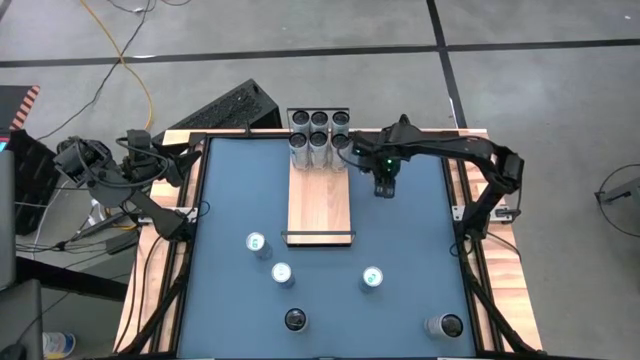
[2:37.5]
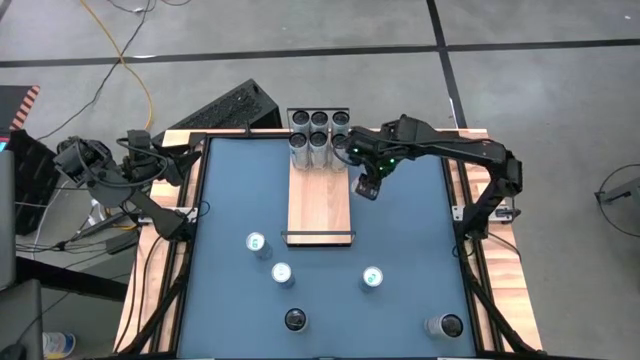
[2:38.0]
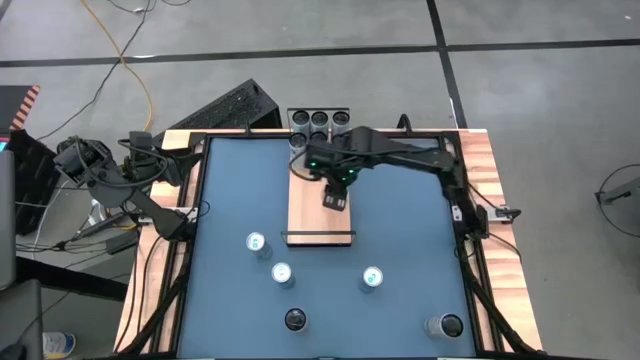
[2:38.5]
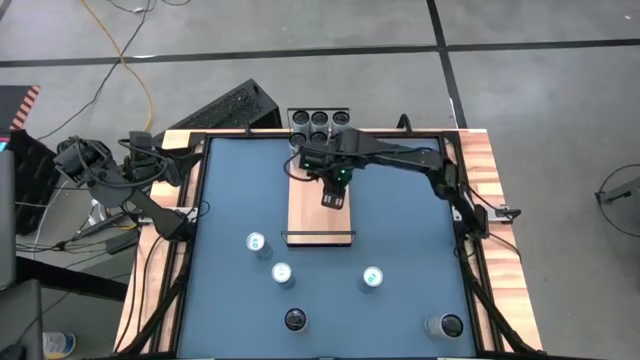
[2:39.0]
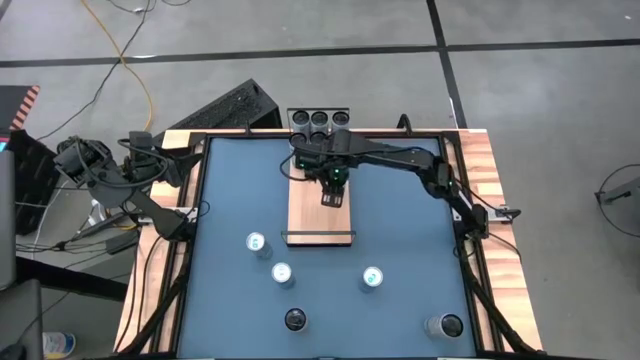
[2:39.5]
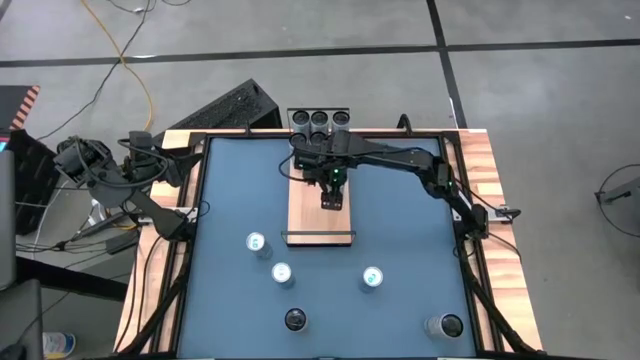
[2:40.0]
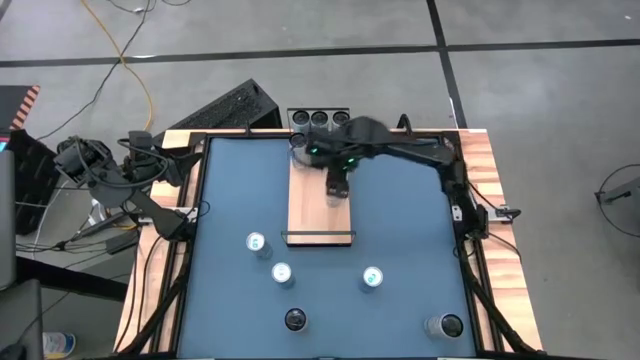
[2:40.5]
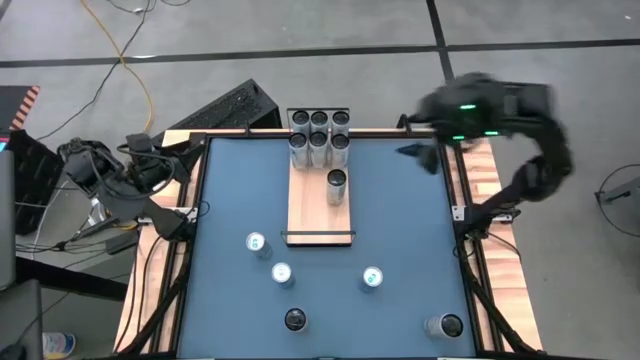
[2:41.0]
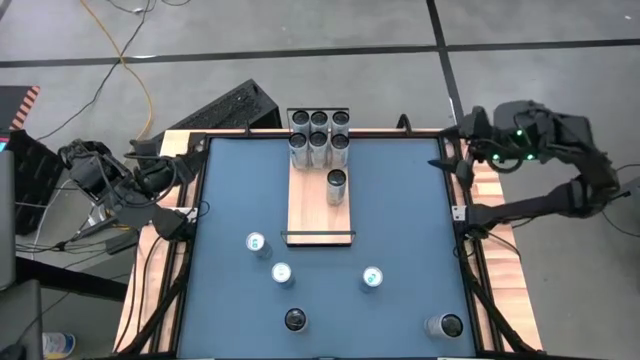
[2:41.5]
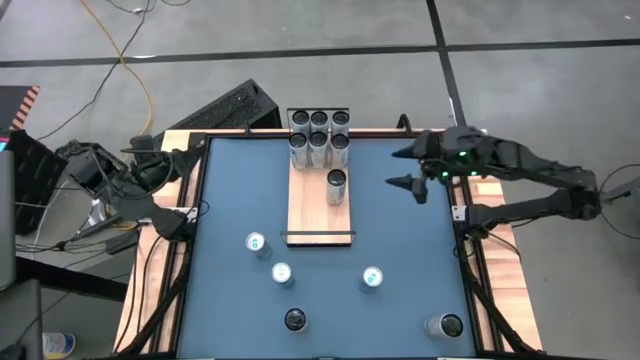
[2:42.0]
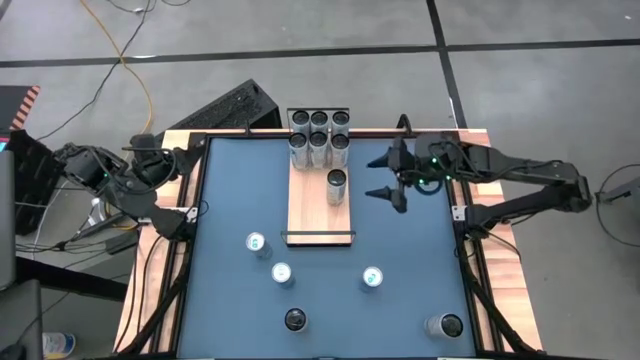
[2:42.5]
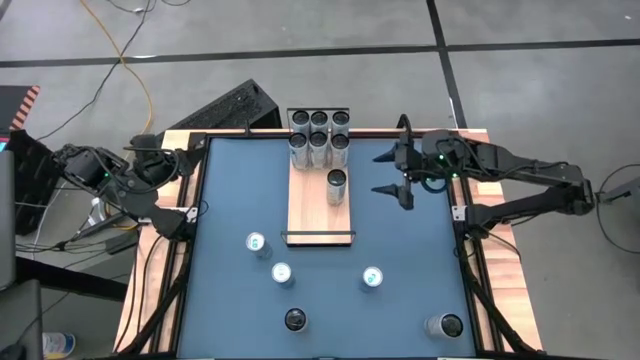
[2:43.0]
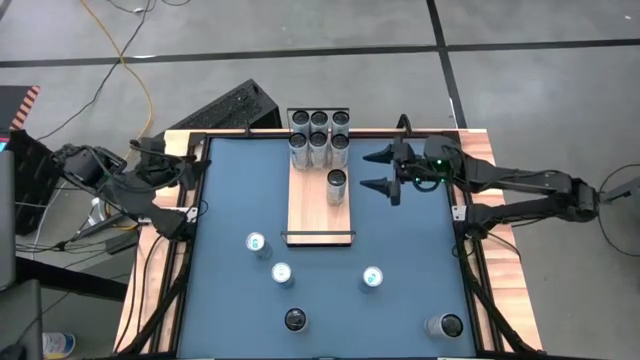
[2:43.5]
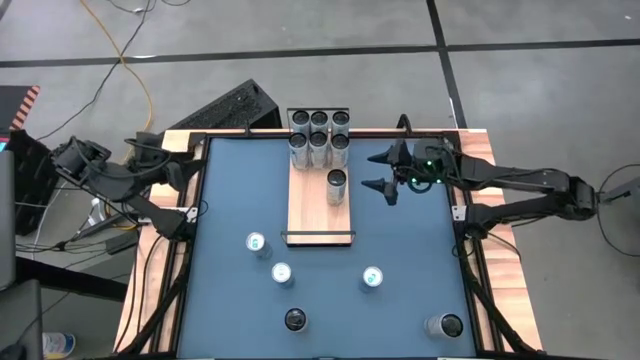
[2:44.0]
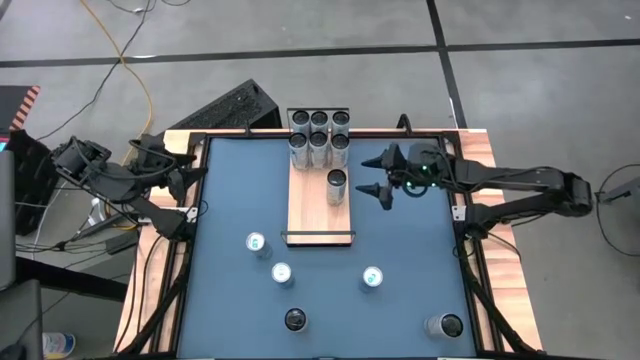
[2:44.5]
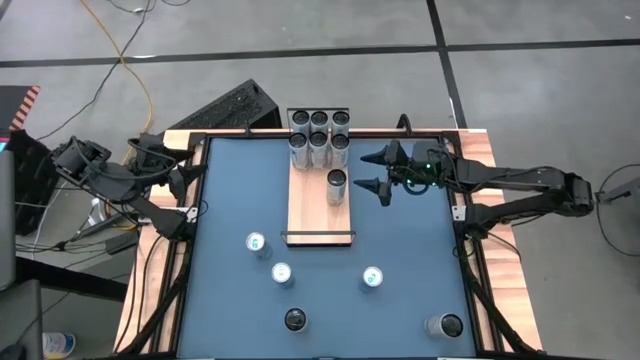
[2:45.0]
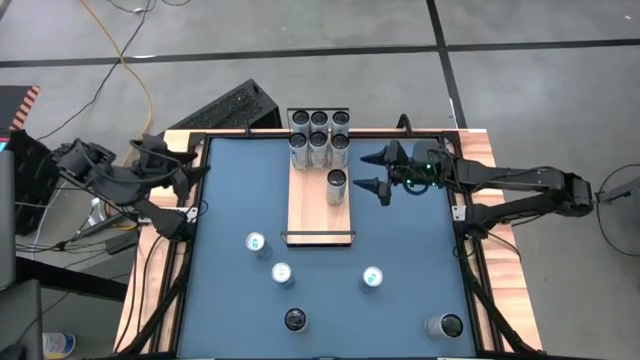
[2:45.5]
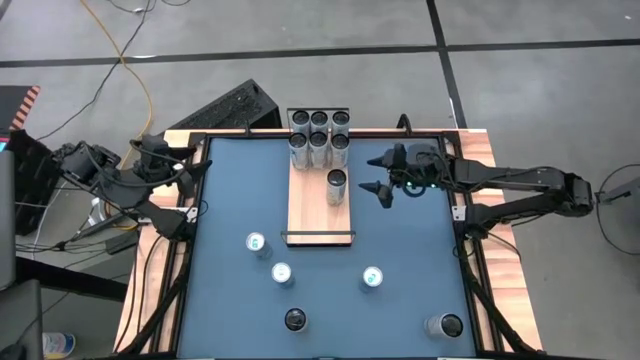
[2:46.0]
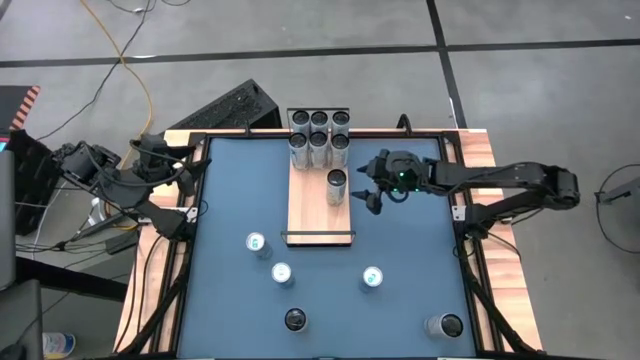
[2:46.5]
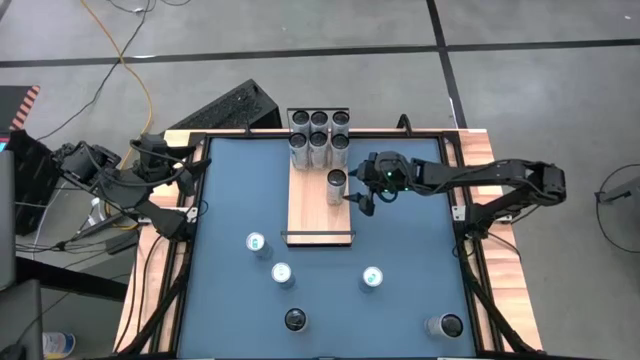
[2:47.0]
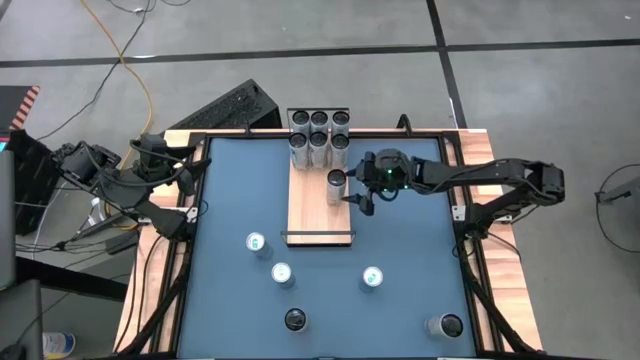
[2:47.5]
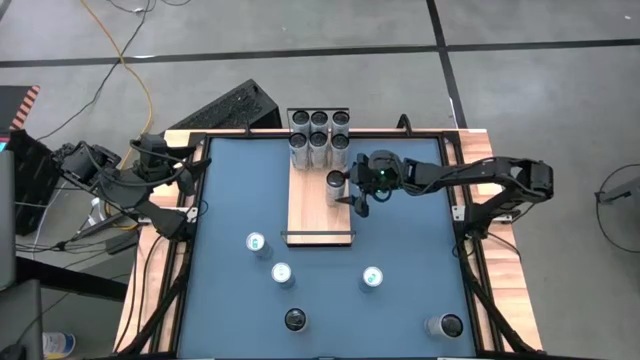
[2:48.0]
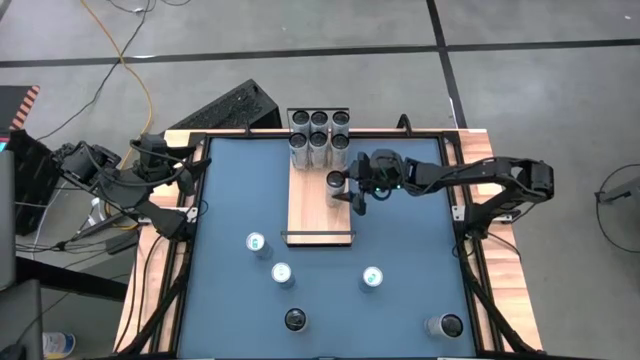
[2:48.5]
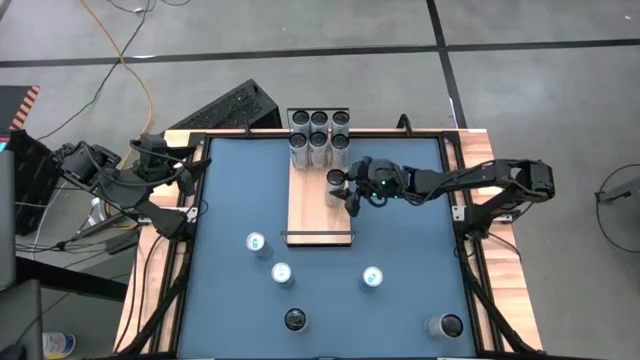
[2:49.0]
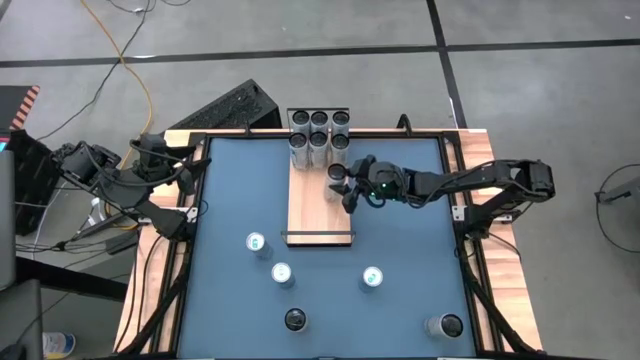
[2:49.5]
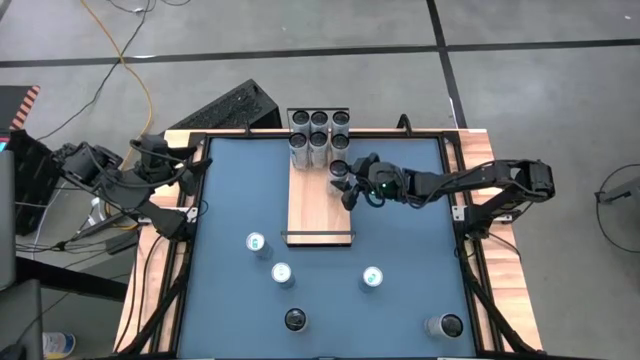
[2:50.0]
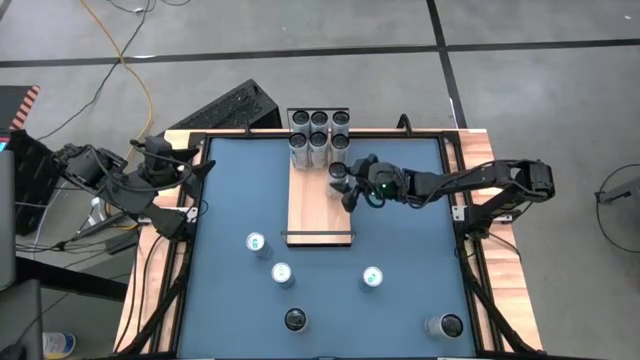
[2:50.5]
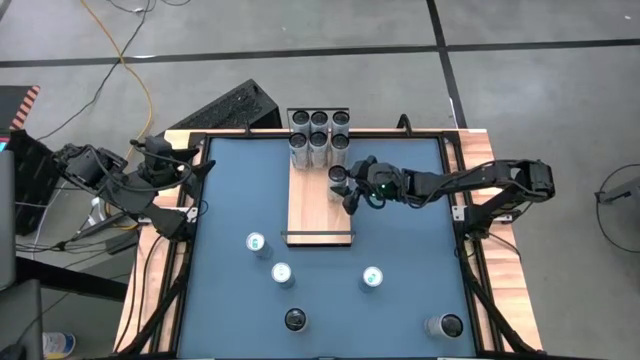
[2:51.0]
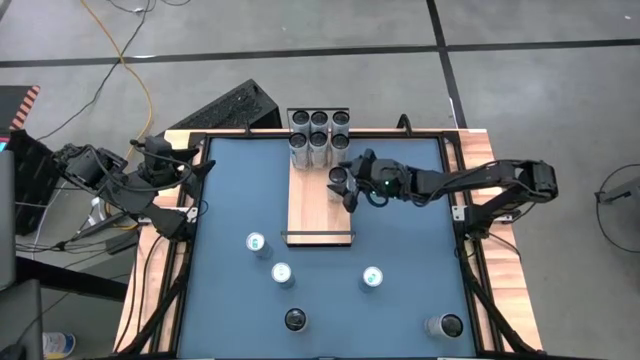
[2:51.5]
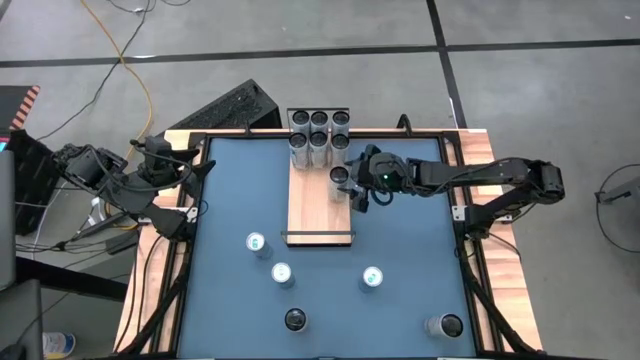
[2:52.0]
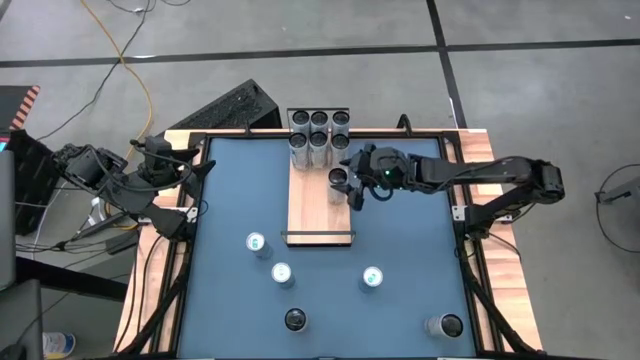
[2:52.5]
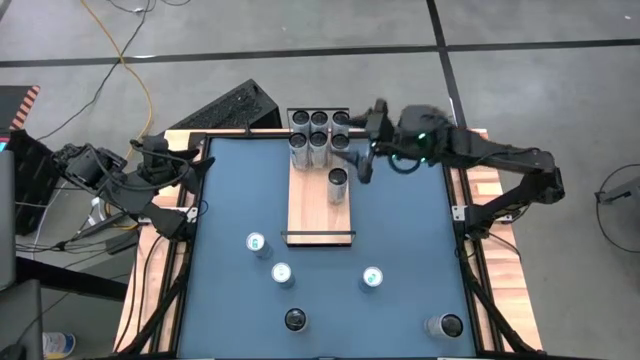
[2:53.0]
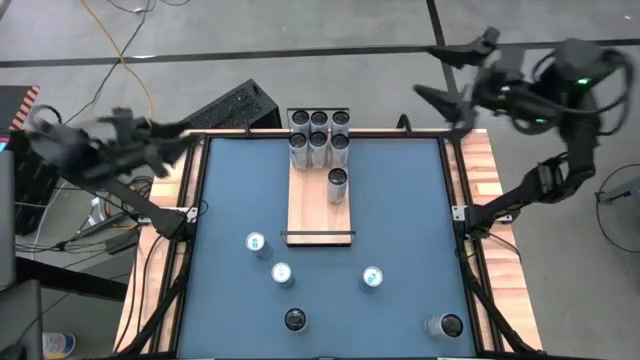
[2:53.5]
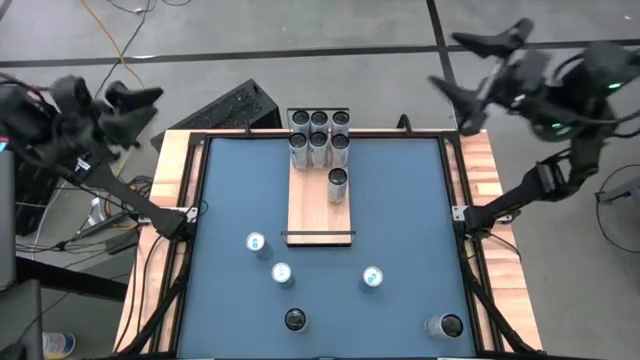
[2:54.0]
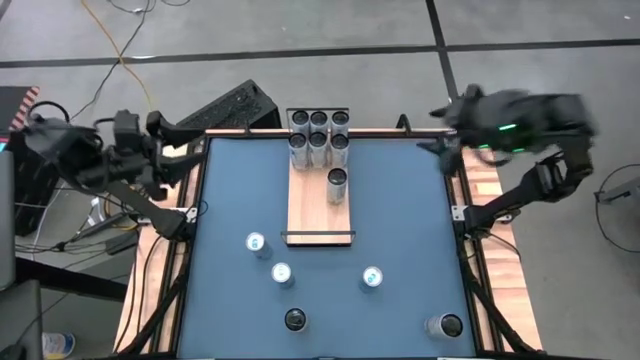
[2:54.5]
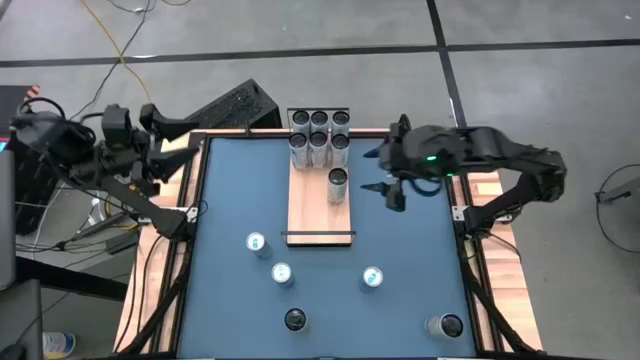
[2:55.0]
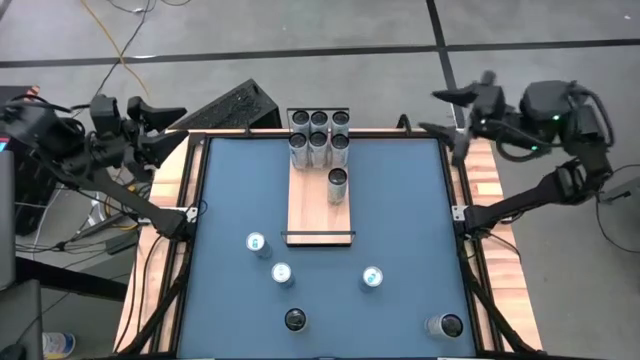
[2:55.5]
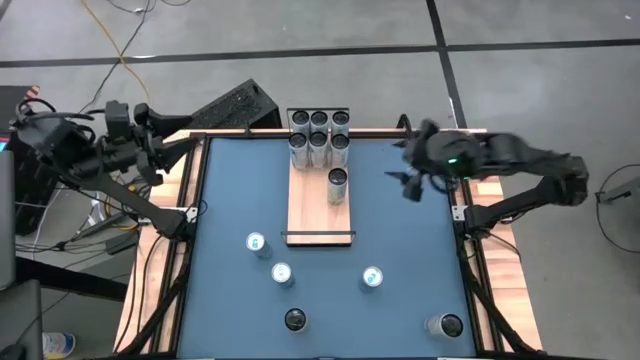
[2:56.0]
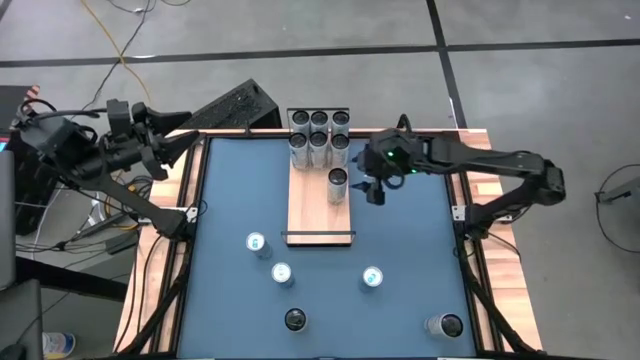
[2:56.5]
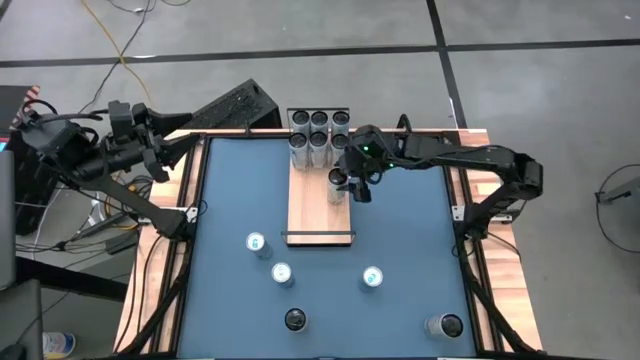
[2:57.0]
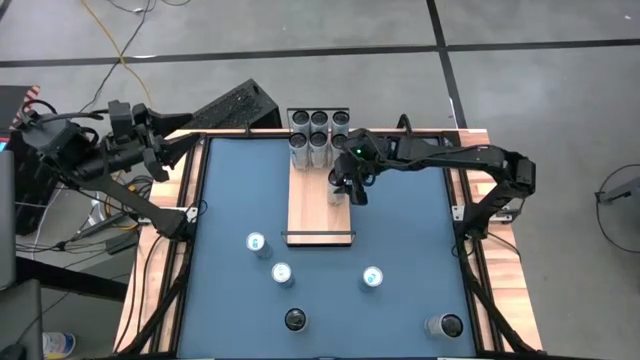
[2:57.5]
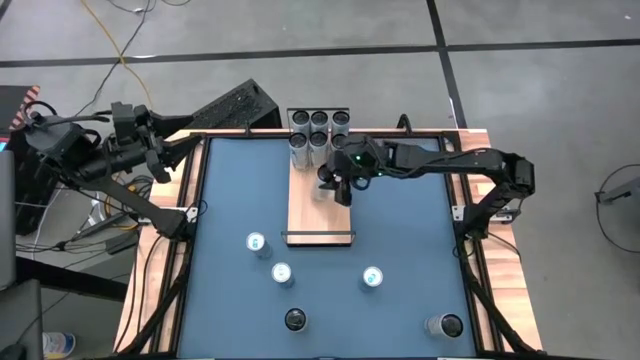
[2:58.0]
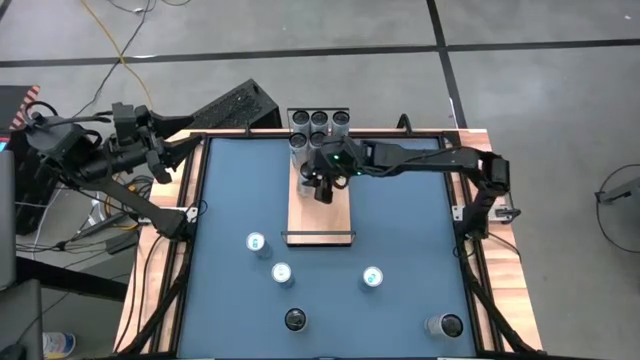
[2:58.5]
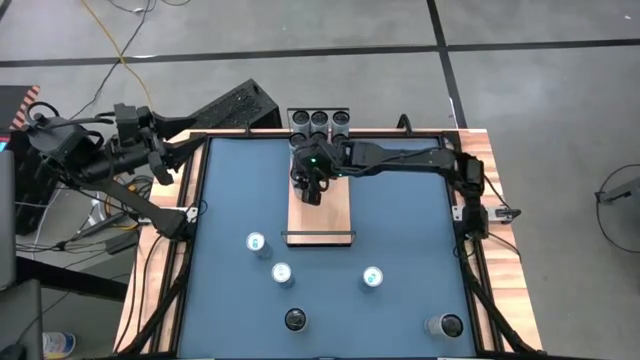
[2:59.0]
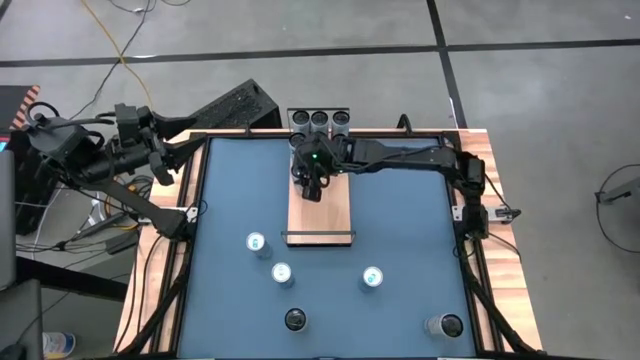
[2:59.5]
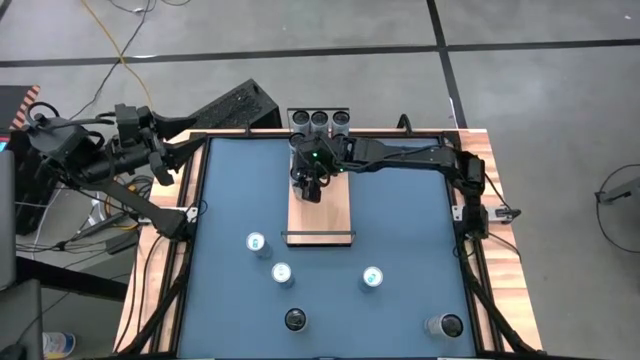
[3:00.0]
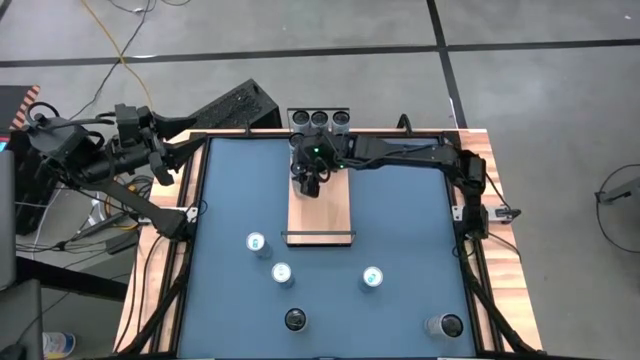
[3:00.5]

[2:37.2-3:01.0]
Task: Place canned beverage on shelf
Put the center white-yellow soda can on the shelf
